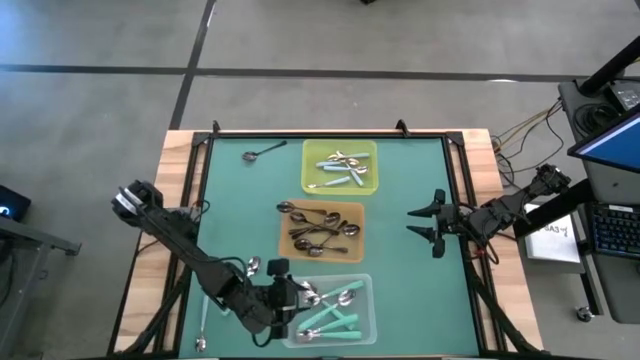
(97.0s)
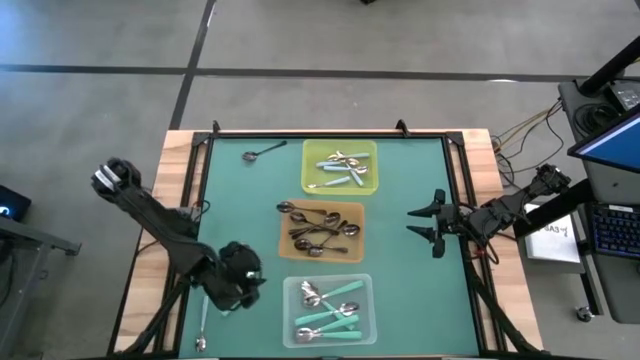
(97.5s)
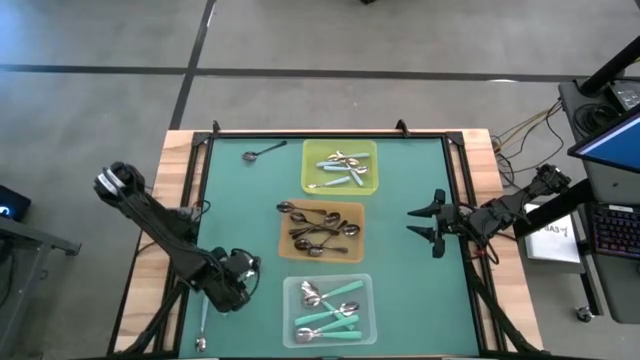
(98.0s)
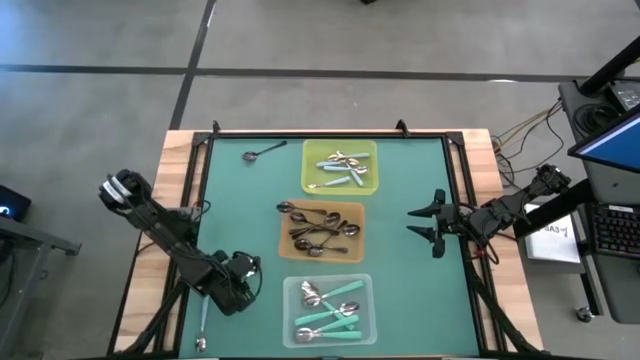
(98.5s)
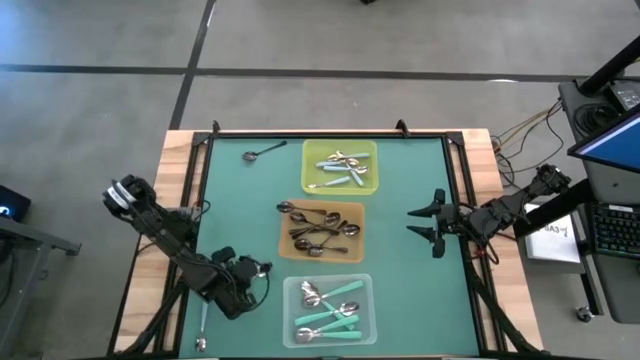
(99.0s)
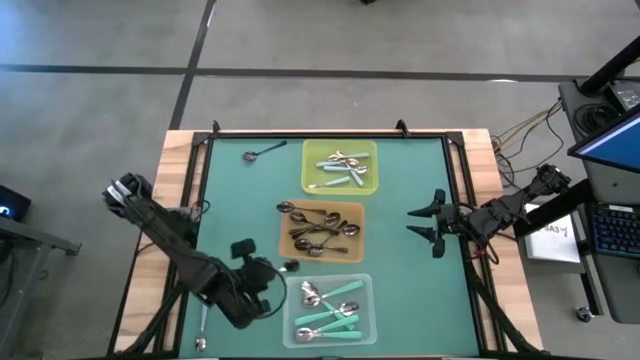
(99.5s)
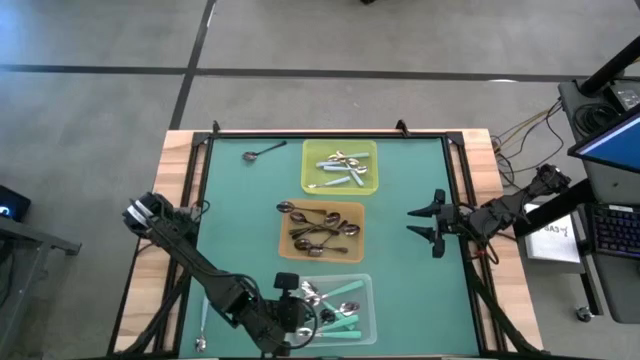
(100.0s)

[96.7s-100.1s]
Task: Sort silverware by color (type)
Put the green spoon into the transparent bin

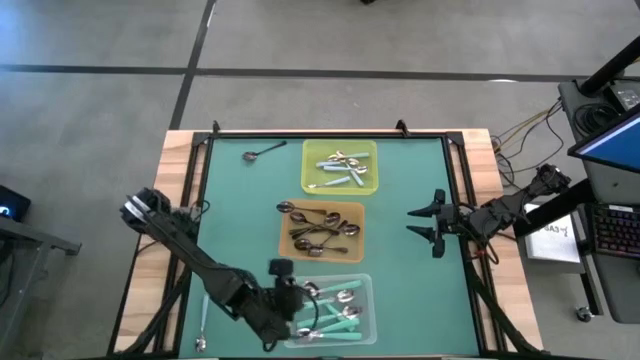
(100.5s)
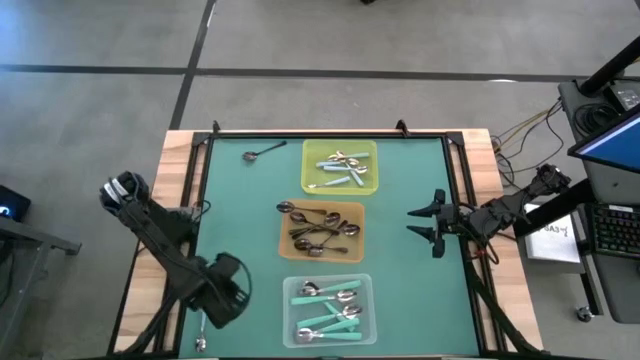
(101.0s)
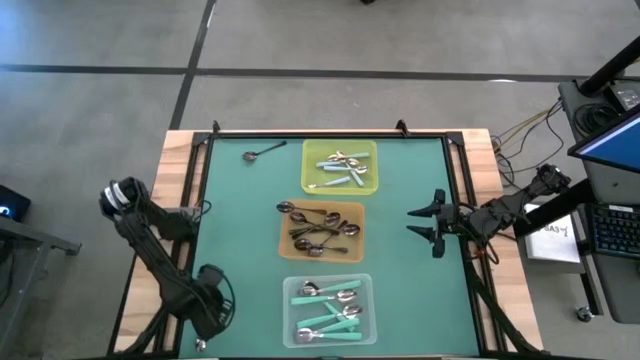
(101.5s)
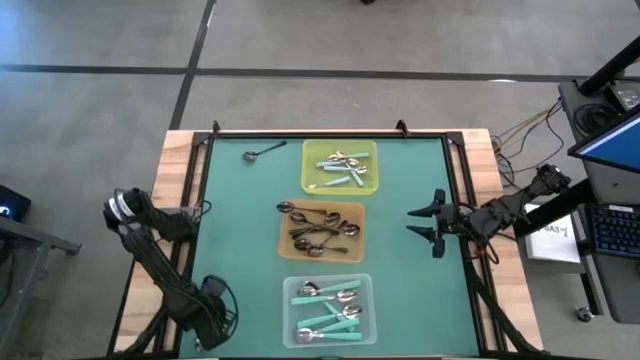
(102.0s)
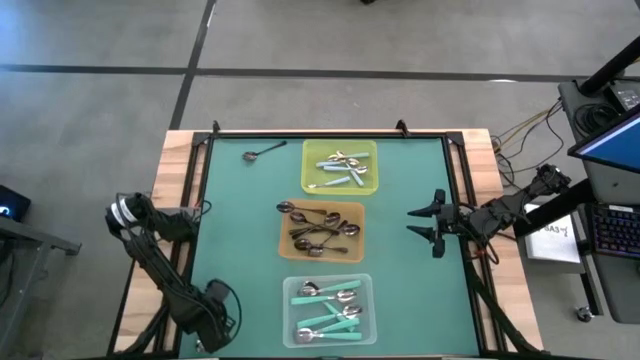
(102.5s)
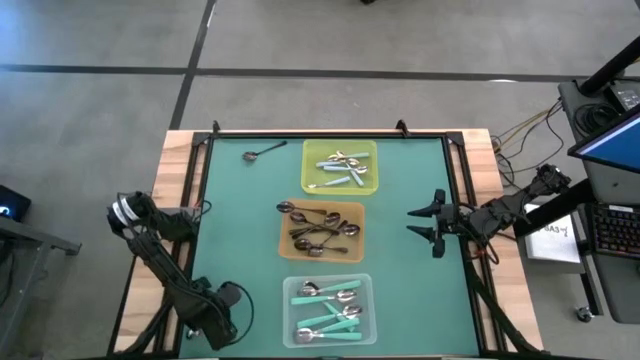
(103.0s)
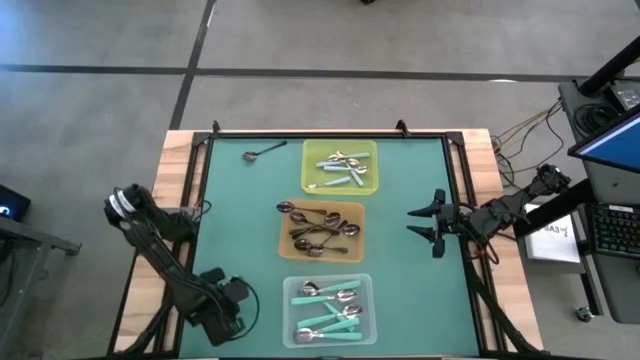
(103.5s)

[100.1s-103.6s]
Put the blue spoon into the yellow bin

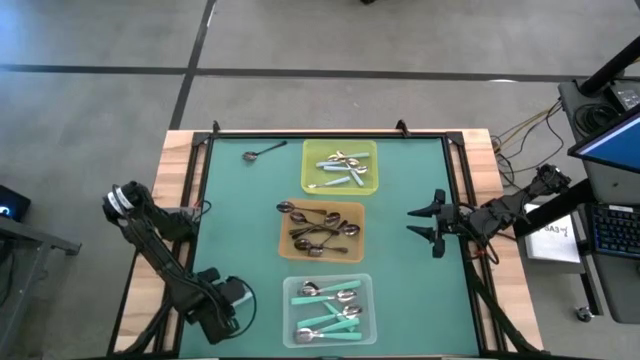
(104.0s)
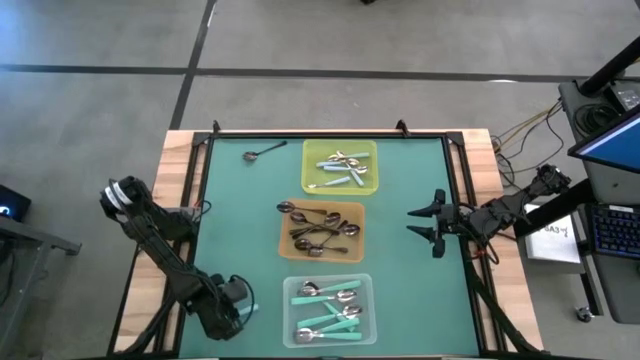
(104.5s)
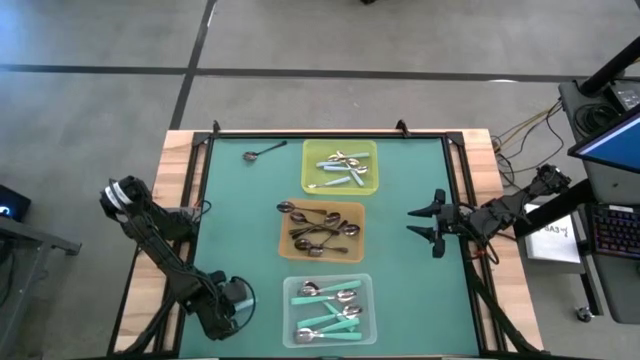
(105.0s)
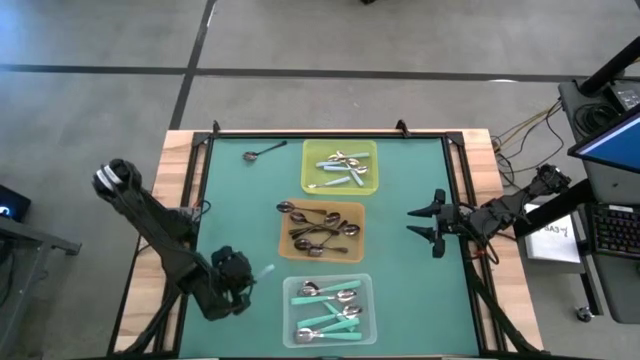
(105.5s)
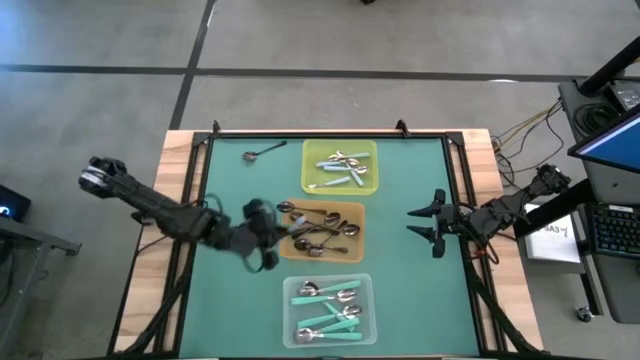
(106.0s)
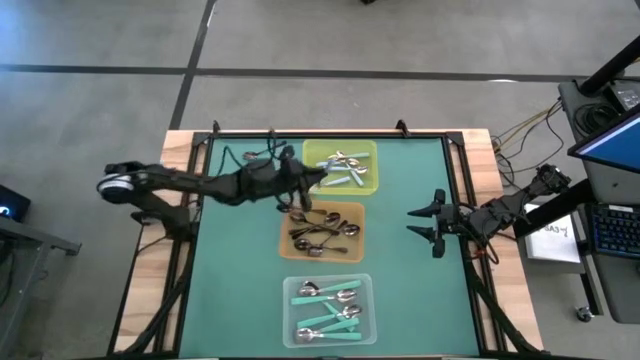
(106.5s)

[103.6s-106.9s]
Put the blue spoon into the yellow bin

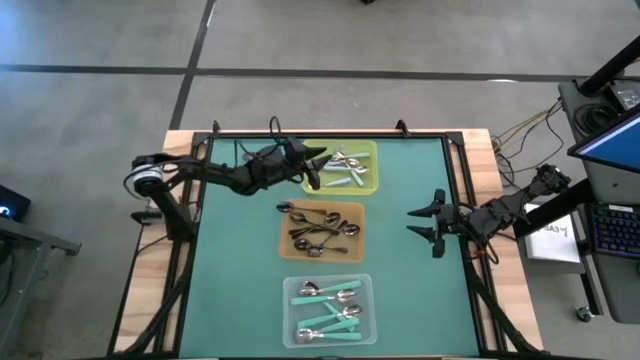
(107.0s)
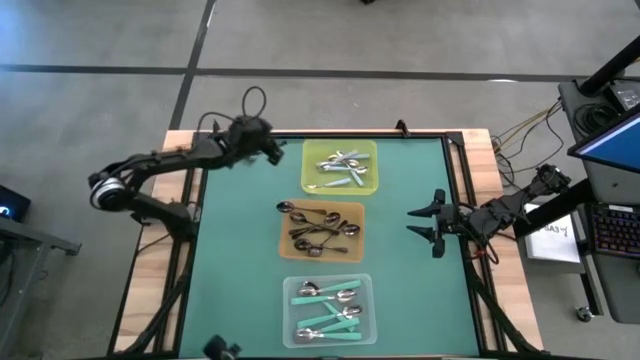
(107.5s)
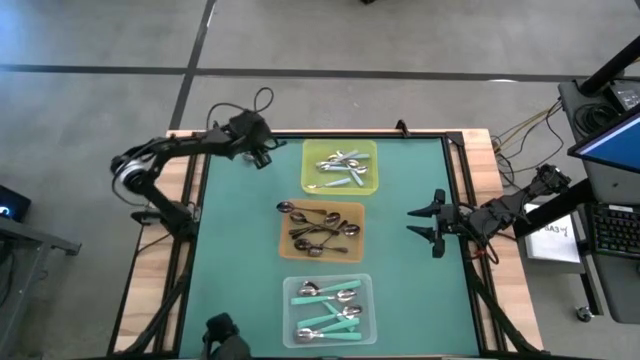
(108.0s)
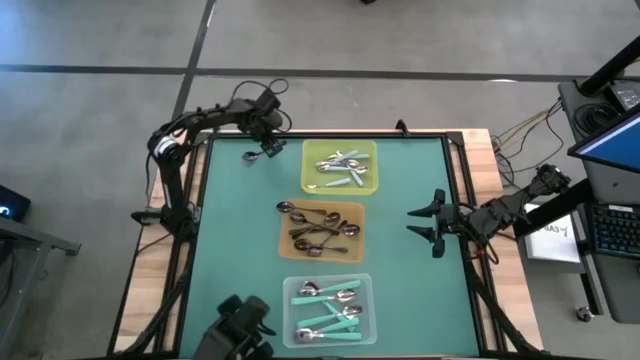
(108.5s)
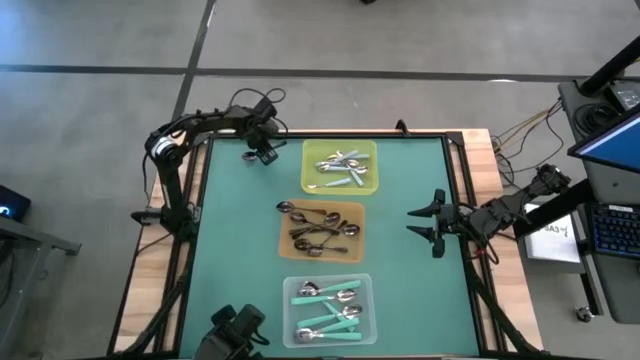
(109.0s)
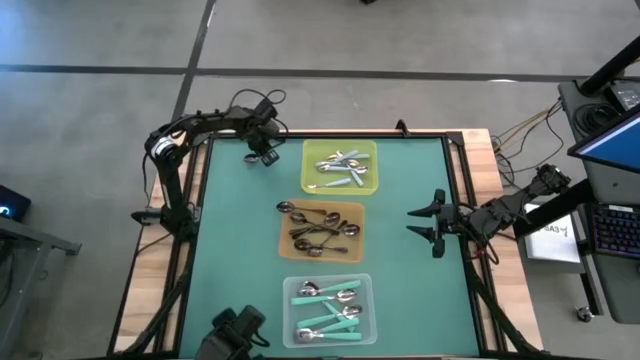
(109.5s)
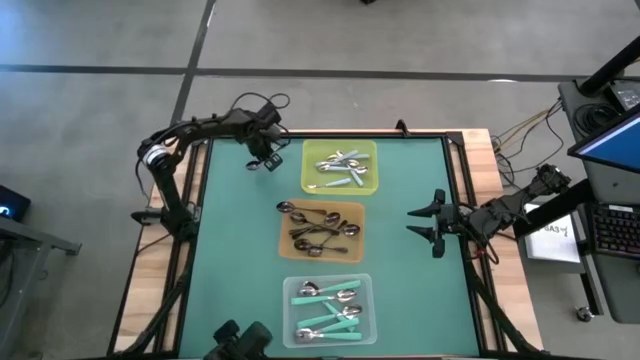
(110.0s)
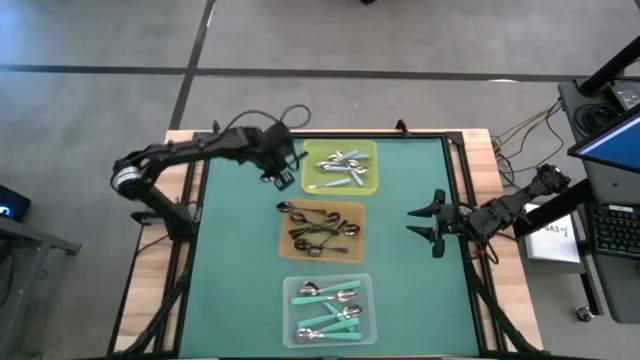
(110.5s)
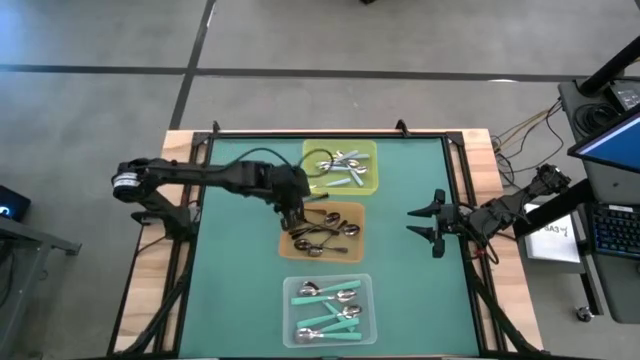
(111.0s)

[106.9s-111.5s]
Put the black spoon into the orange bin

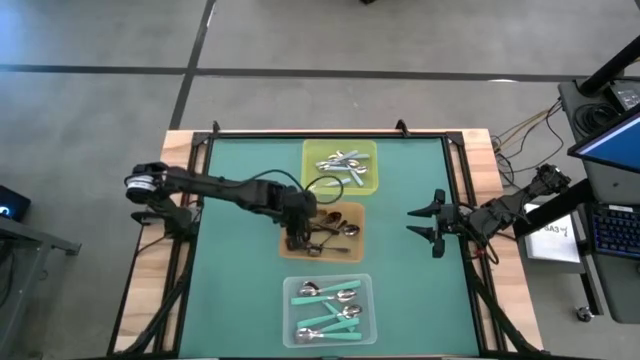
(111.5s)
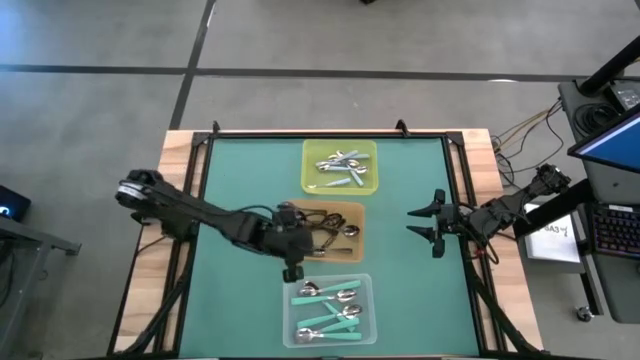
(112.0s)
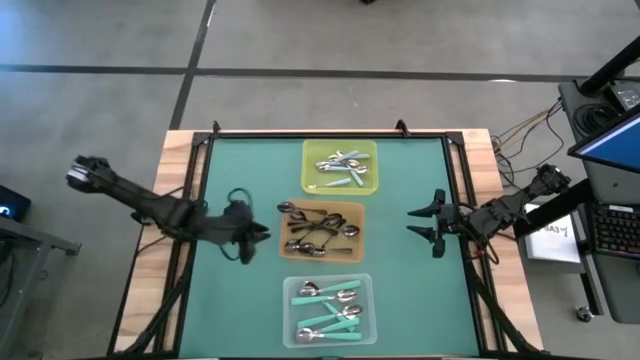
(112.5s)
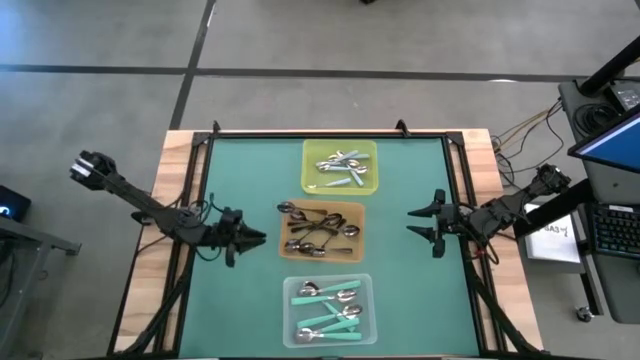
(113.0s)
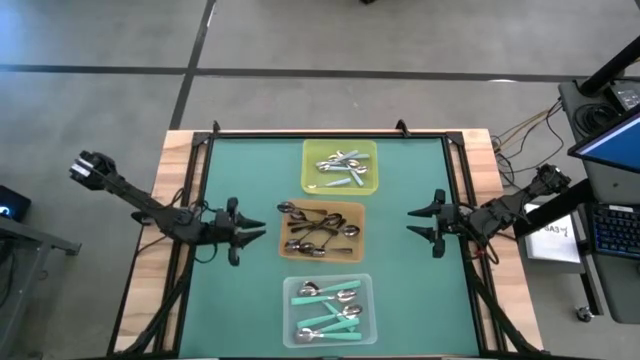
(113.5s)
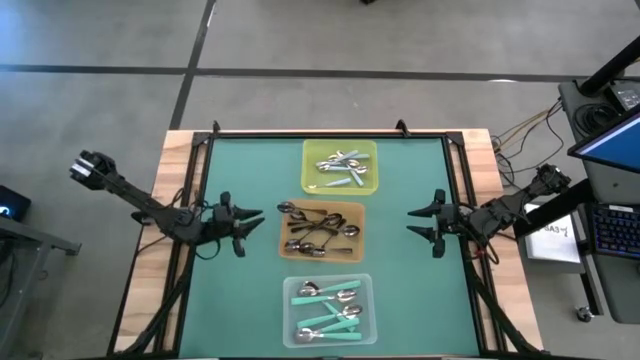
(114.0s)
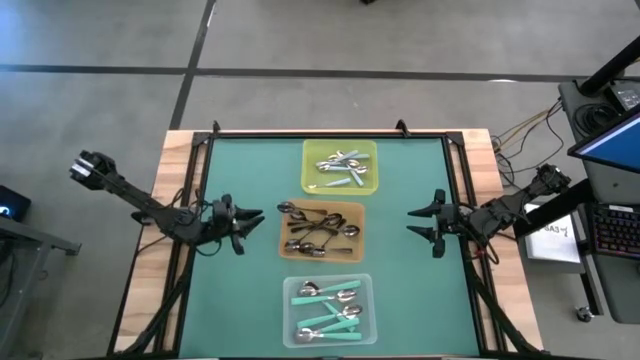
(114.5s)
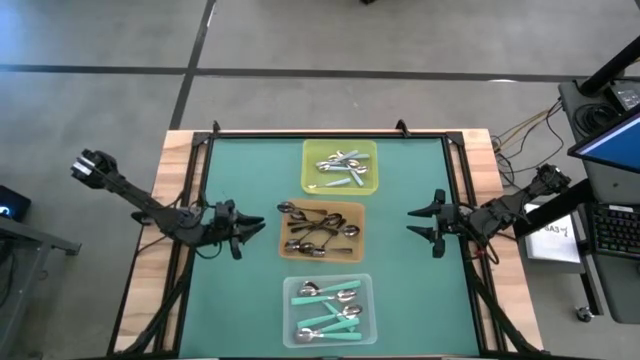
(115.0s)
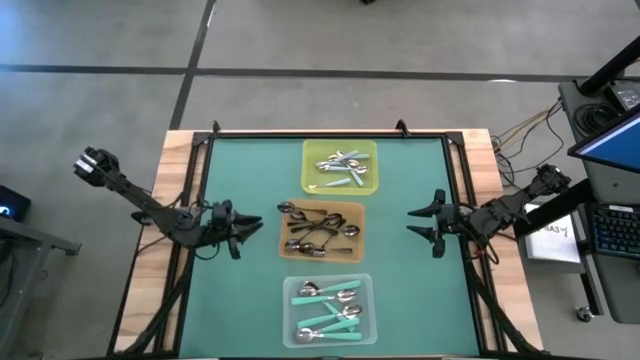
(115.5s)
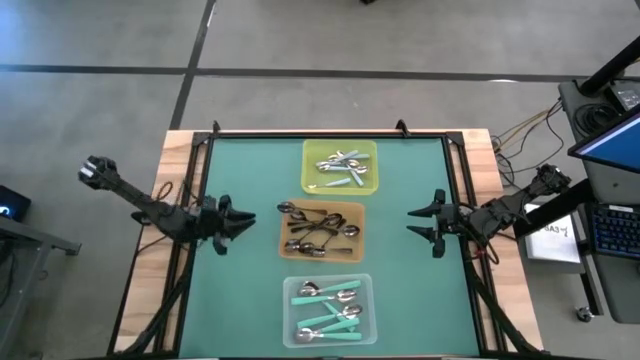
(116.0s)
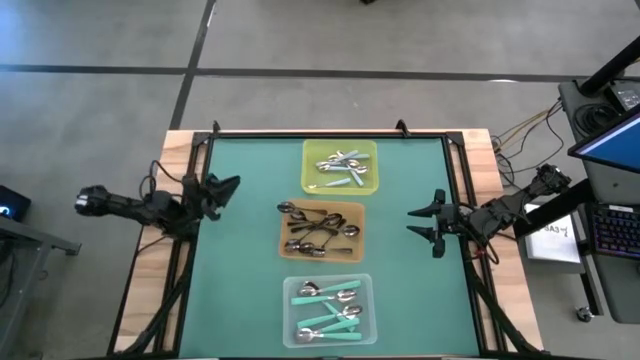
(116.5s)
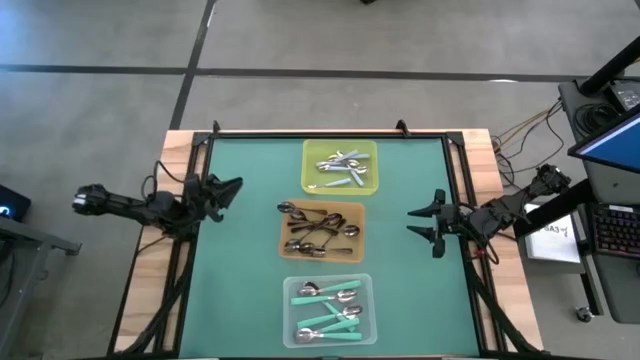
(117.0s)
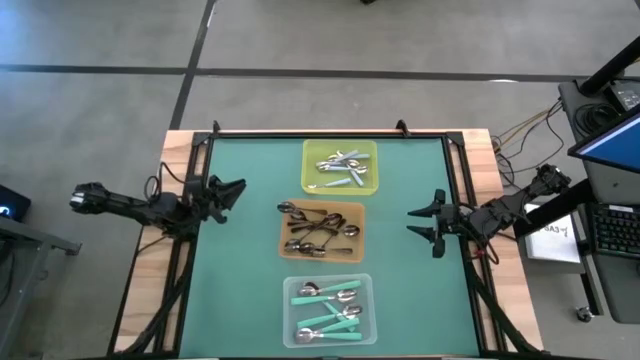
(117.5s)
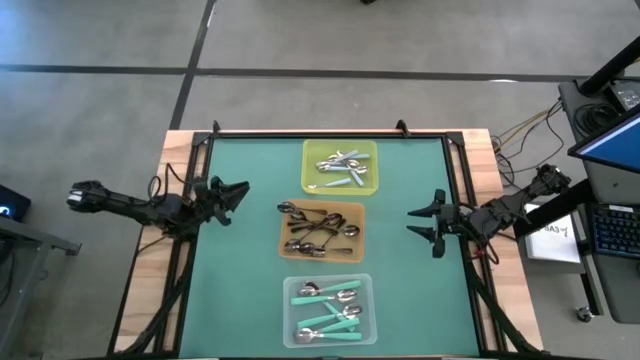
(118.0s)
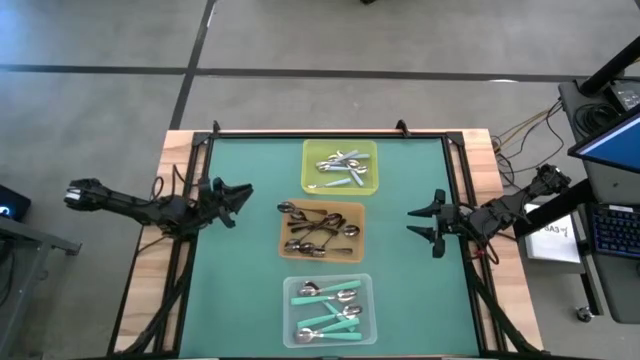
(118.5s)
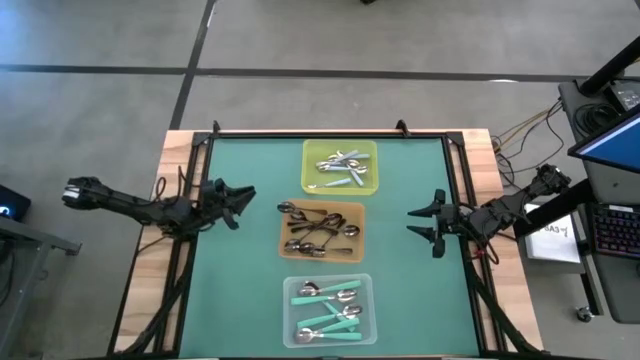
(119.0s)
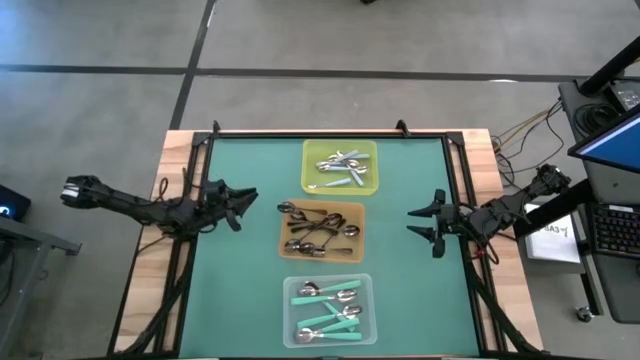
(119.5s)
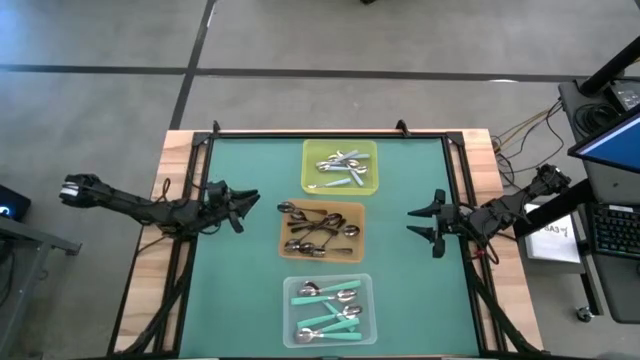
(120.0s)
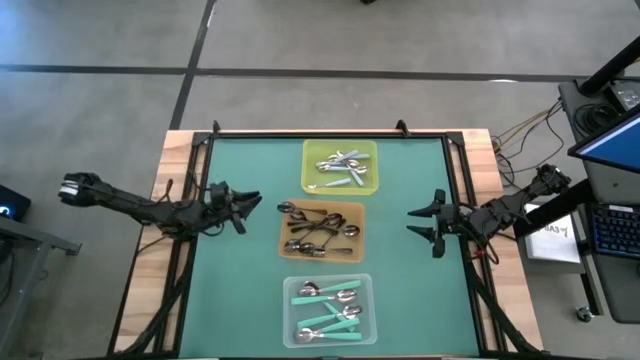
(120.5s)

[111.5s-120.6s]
Return to Home Position
